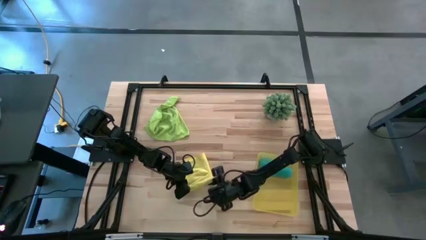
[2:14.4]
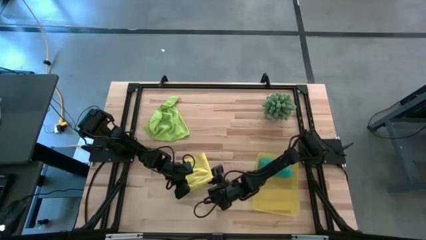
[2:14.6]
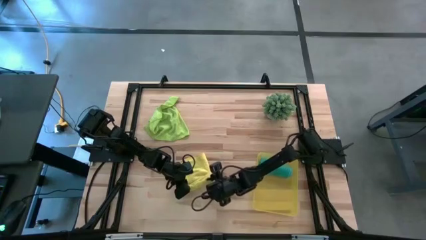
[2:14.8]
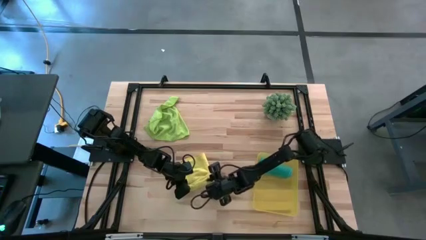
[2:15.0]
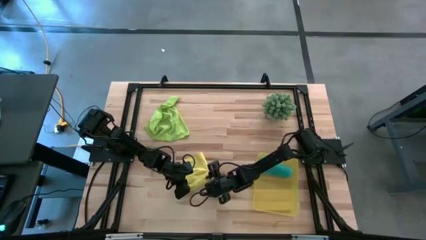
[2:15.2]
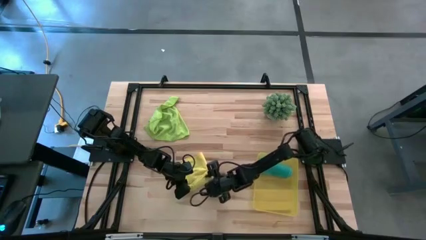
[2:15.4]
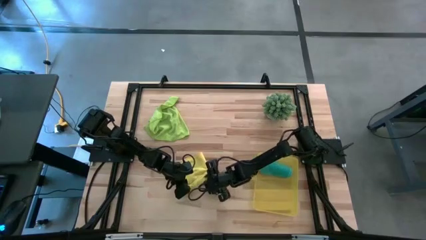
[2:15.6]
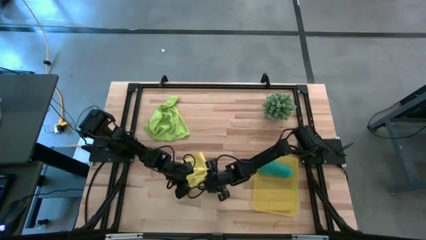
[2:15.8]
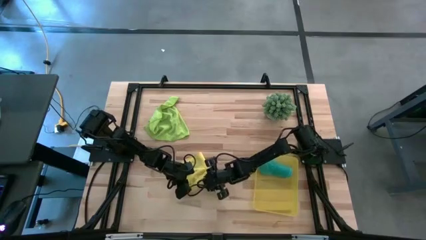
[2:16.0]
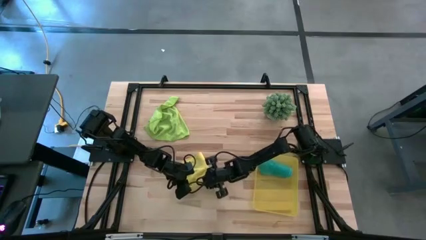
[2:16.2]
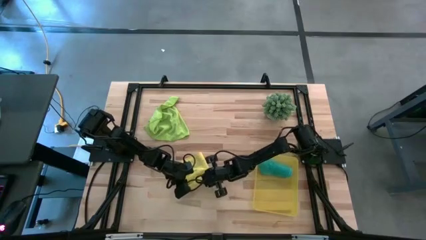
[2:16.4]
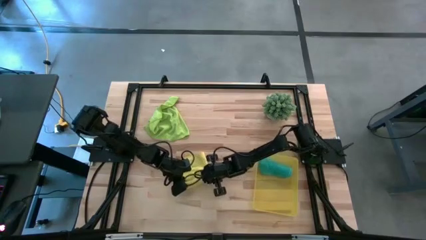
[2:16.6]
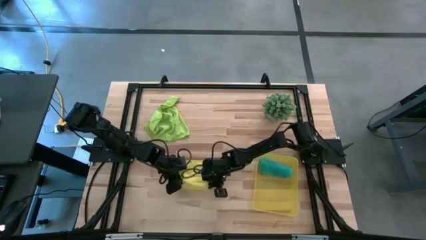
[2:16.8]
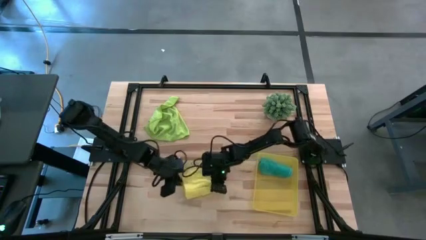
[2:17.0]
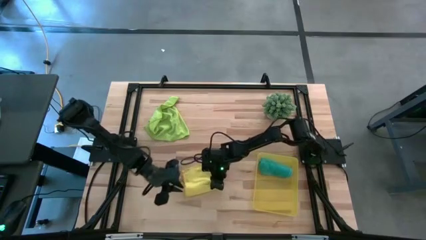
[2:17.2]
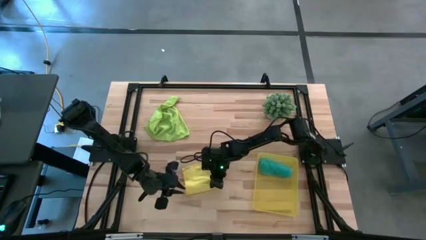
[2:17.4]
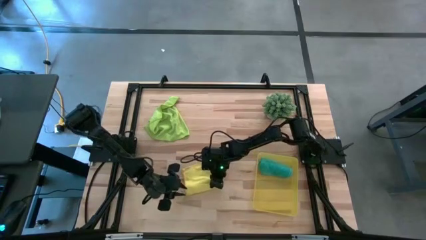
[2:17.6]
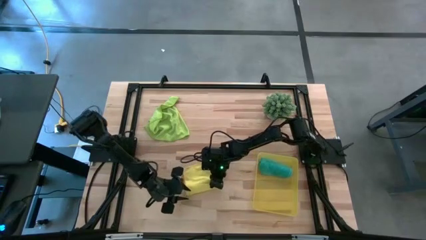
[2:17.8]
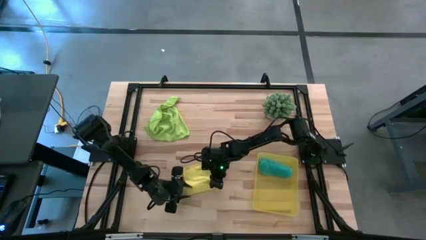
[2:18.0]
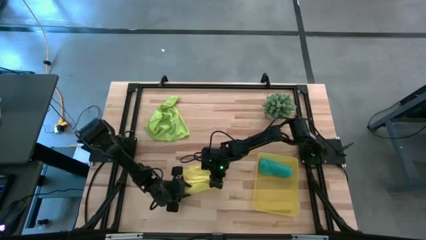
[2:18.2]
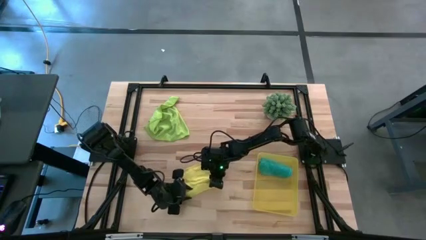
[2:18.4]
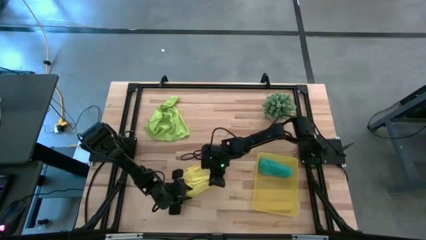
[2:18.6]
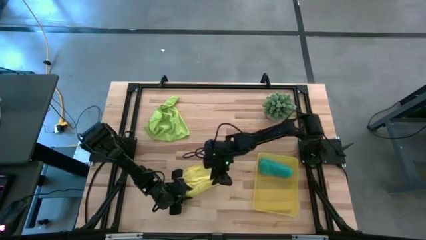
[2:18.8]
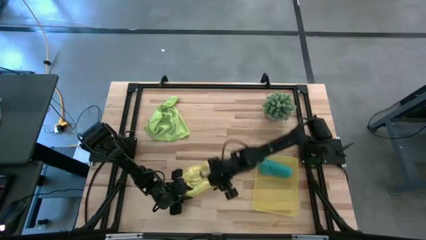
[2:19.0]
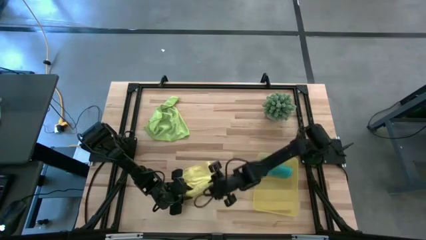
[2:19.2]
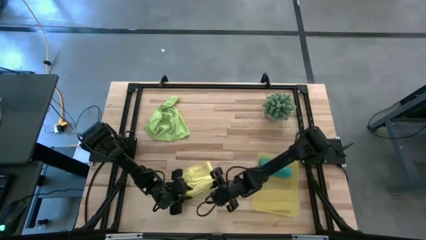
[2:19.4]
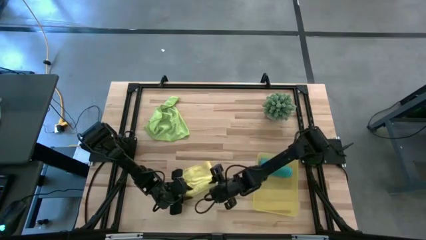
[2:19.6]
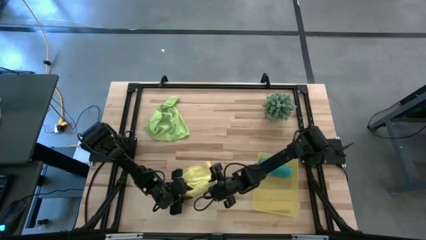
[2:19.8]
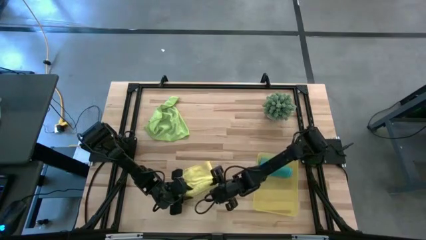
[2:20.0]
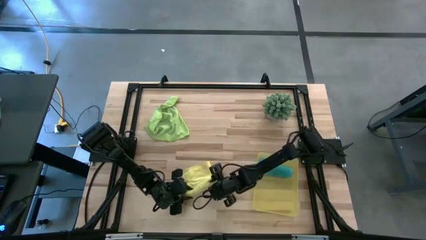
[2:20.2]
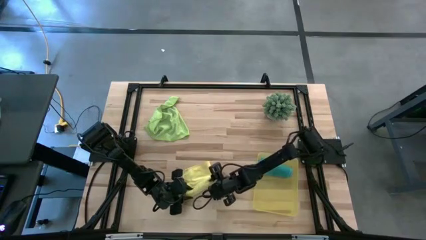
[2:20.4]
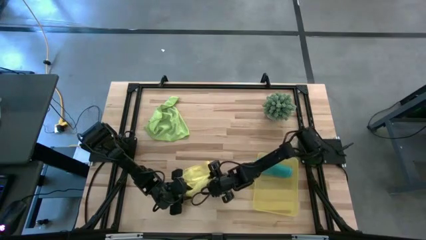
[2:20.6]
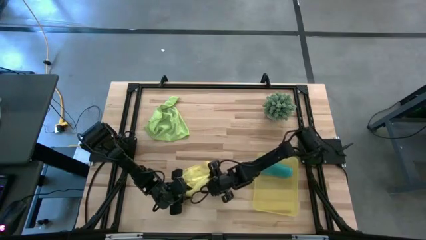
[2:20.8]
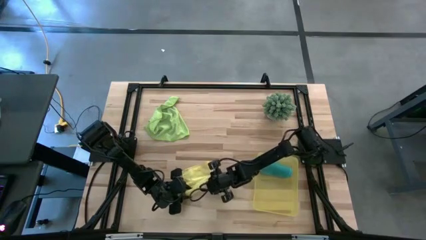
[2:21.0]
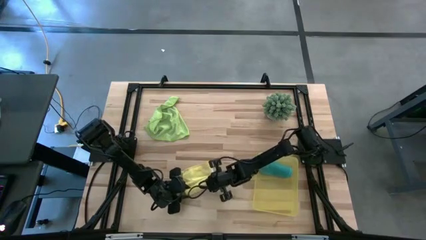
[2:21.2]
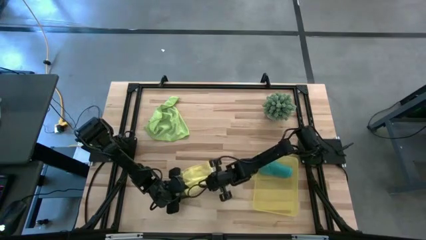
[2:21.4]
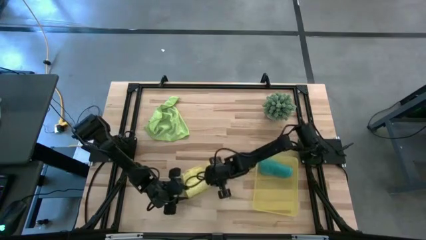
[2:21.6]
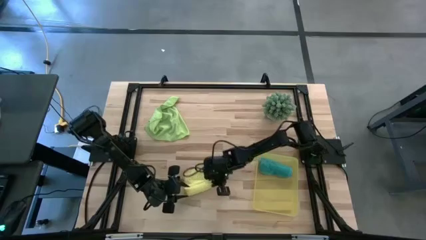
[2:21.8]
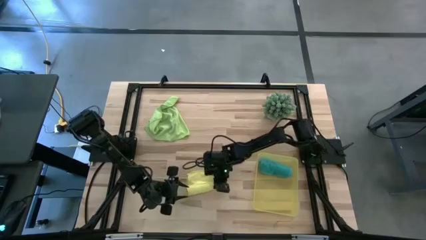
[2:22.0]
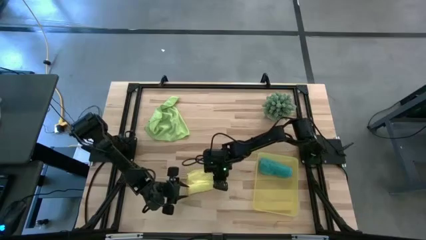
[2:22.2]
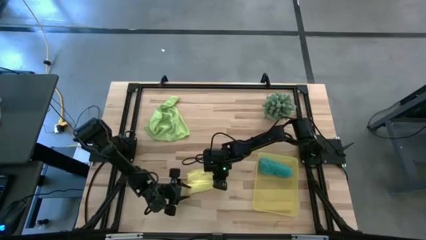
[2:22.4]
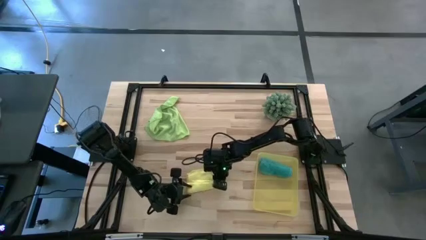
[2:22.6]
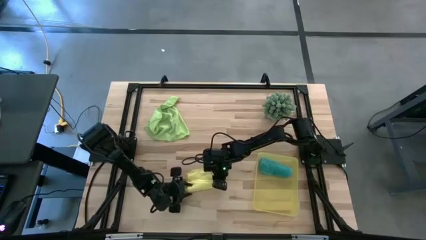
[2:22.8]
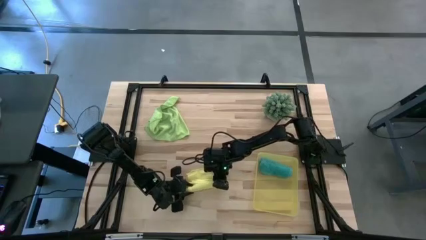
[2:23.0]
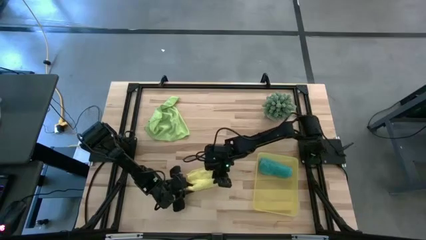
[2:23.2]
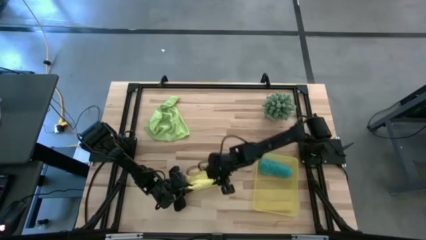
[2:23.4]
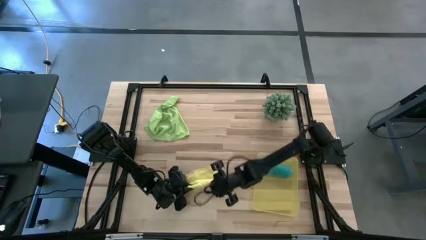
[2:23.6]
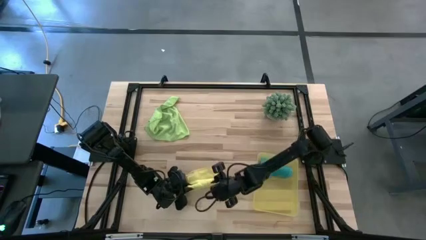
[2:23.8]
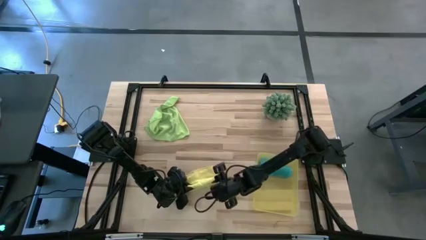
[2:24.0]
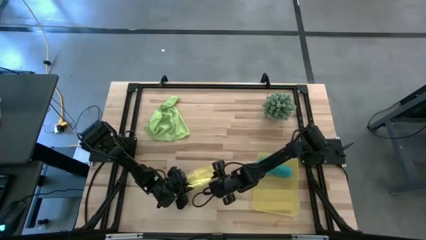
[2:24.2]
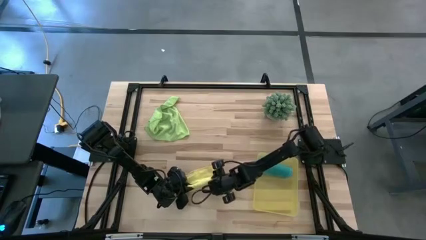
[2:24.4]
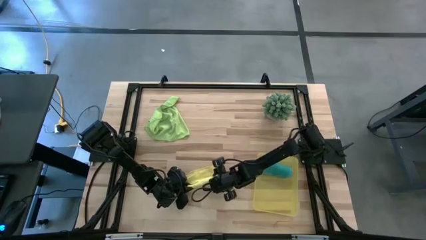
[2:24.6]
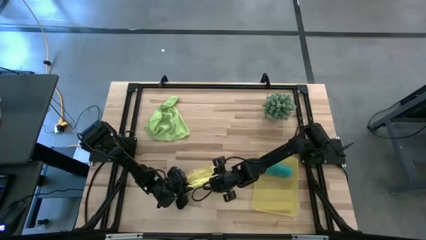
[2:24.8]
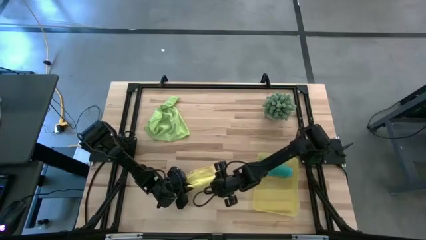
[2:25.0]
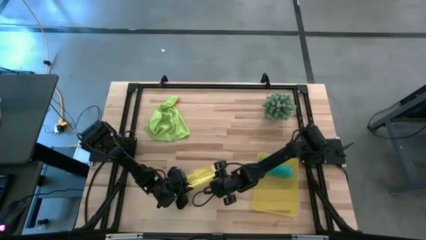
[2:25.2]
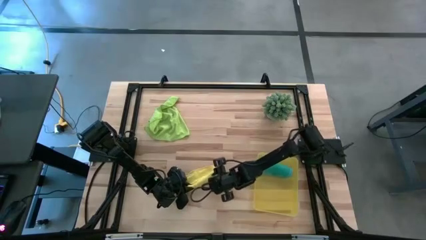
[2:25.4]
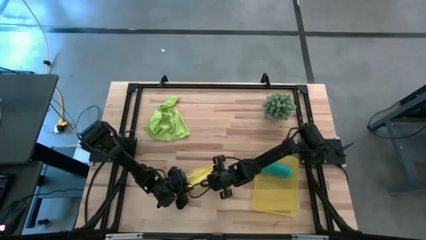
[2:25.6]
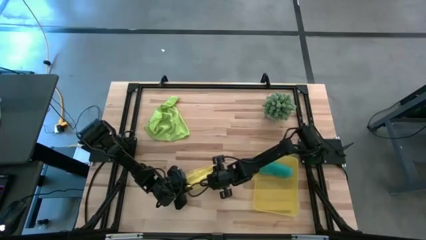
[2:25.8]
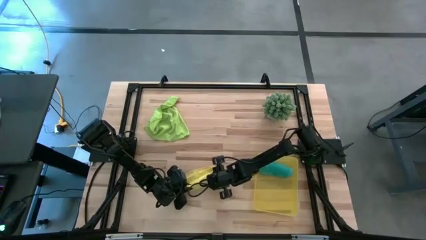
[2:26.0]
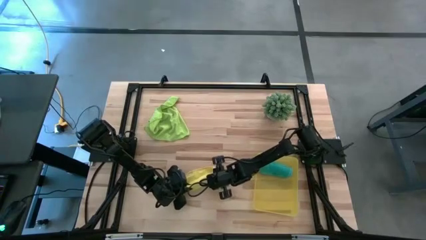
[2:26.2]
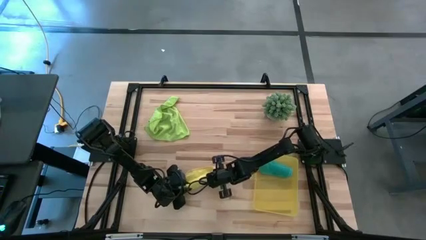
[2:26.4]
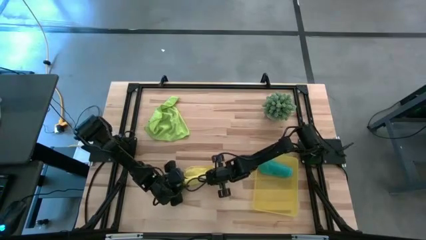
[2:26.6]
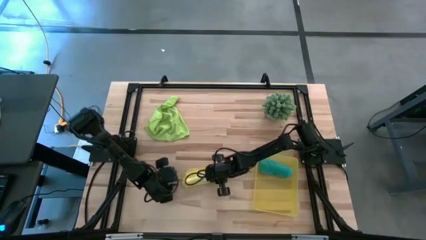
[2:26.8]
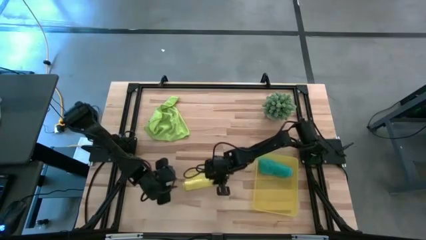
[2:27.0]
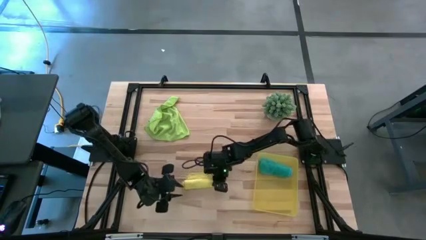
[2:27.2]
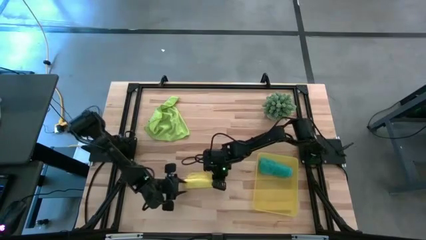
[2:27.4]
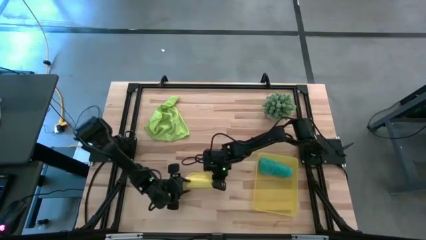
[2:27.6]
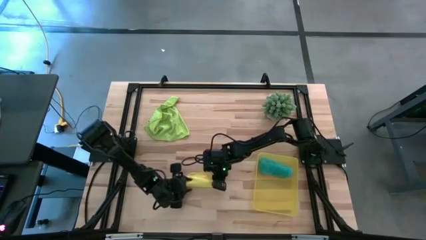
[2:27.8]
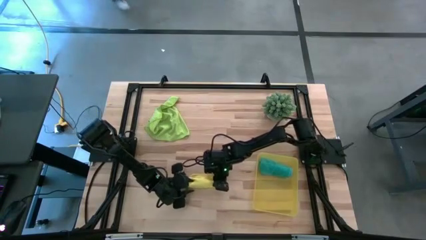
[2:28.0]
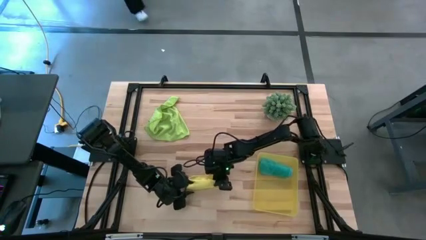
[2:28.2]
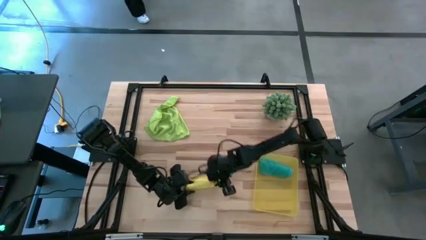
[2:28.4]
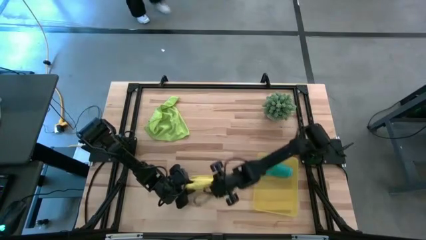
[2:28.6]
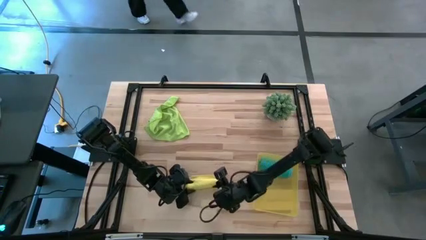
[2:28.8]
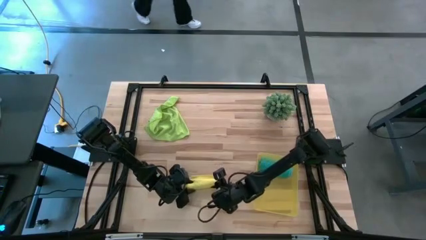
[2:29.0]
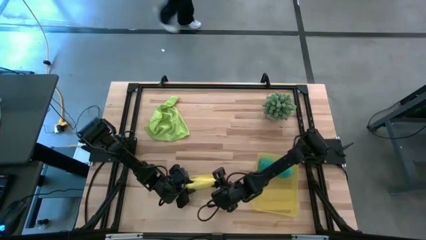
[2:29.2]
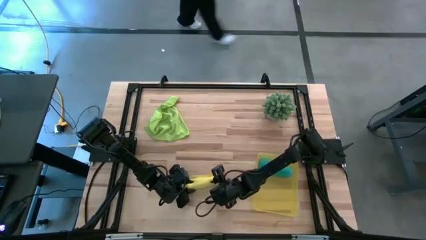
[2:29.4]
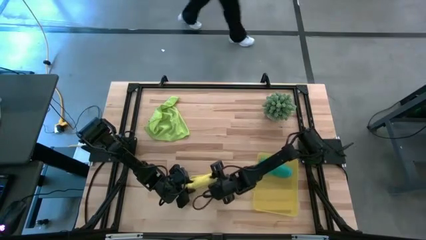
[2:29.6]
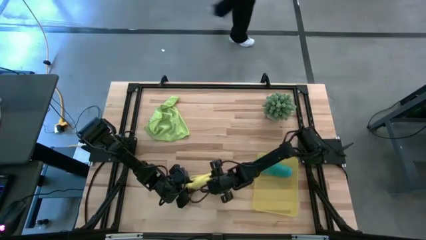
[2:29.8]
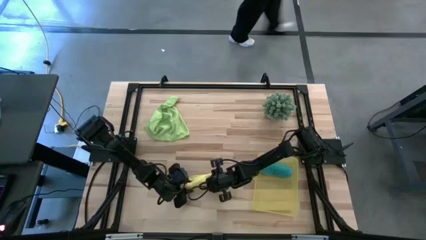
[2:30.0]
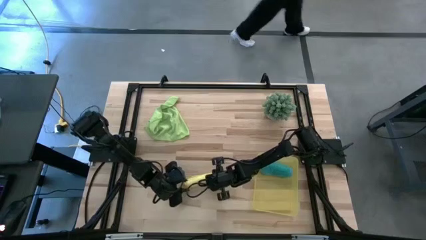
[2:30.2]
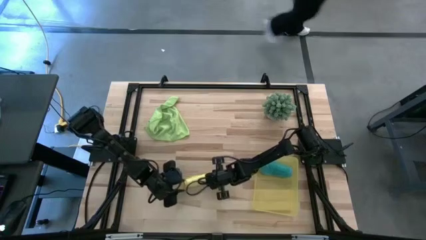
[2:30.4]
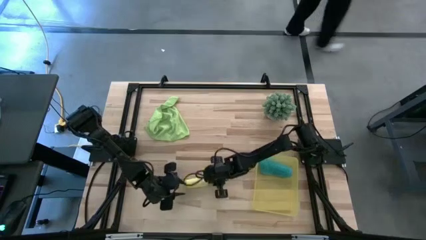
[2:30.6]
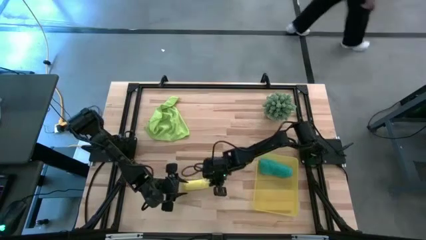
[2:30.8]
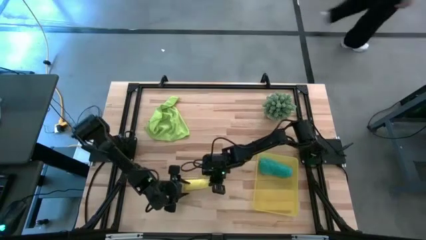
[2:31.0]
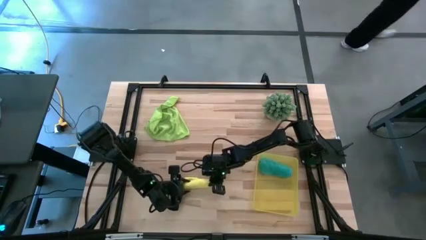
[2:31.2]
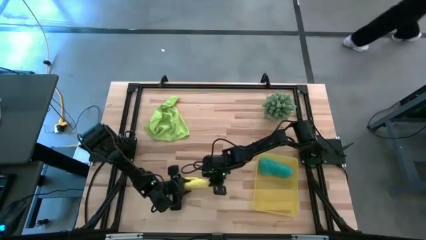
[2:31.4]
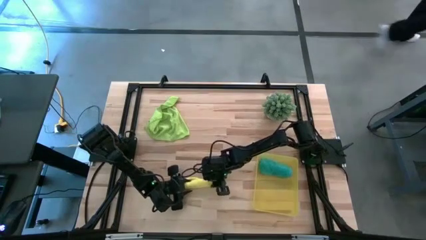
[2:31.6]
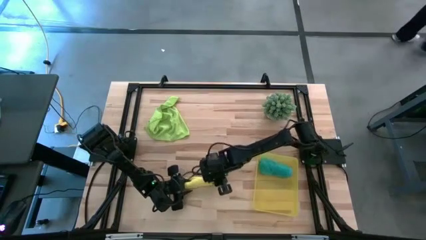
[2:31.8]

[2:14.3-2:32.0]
Task: Roll microfiber towels into tight, uniform cylinder then place into a basket
Roll the yellow microfiber cloth
